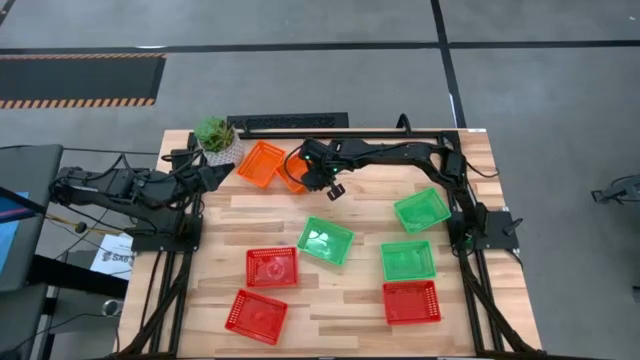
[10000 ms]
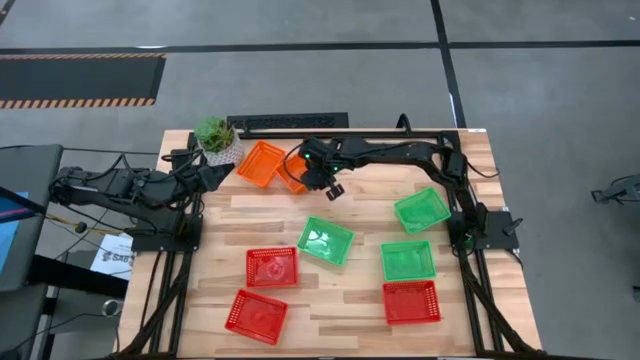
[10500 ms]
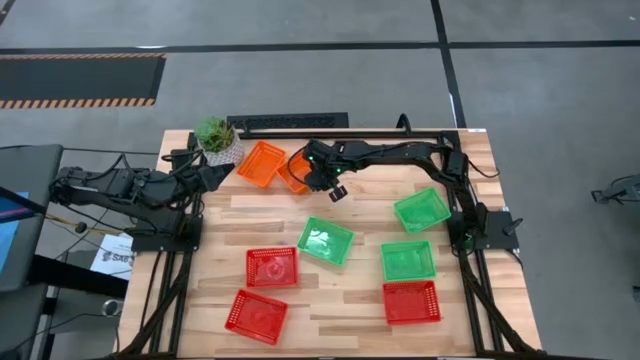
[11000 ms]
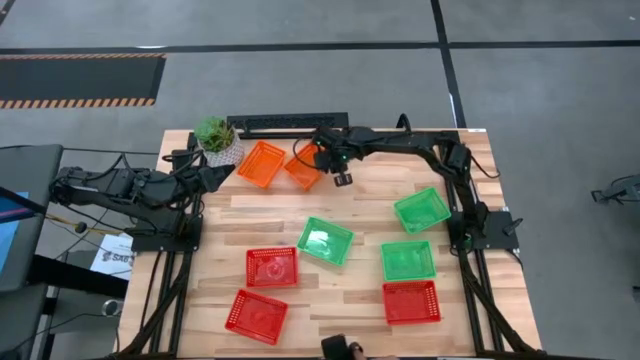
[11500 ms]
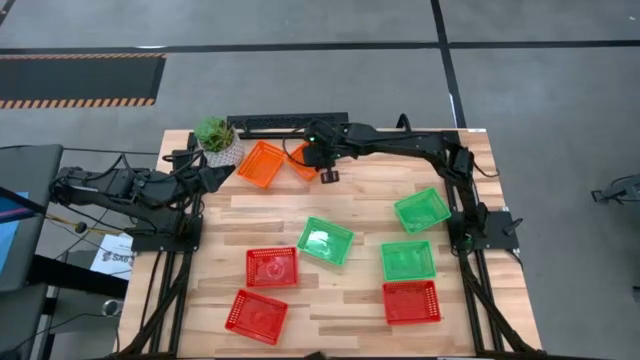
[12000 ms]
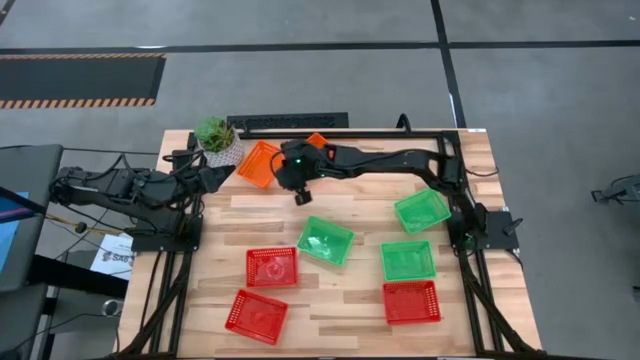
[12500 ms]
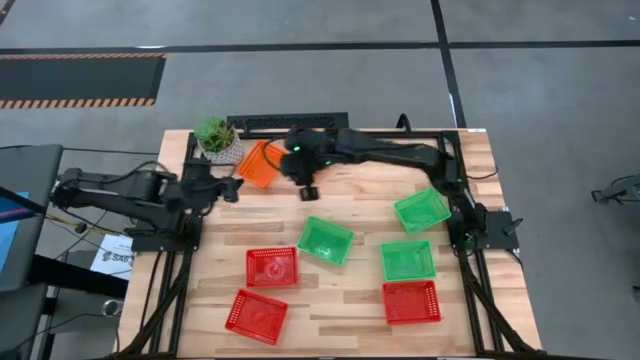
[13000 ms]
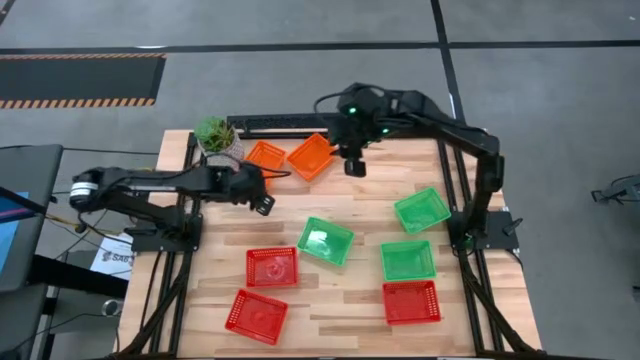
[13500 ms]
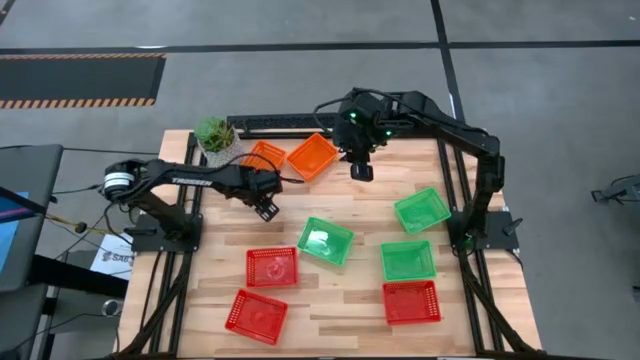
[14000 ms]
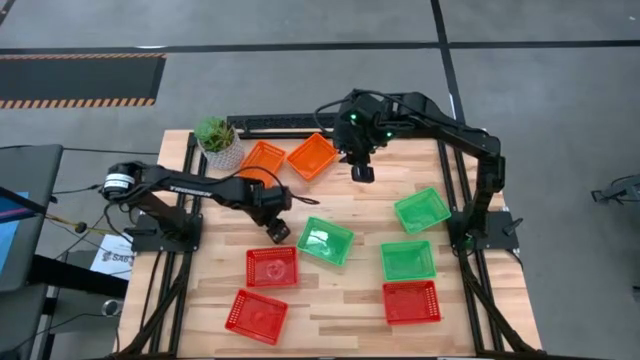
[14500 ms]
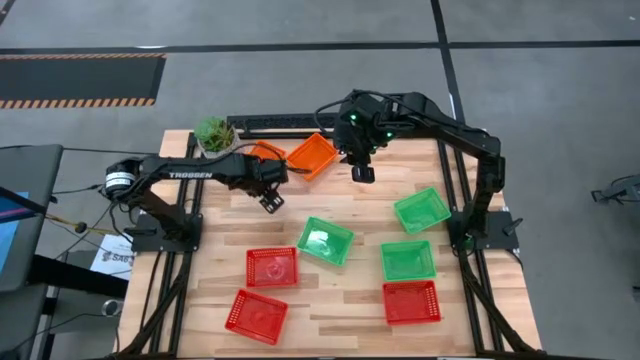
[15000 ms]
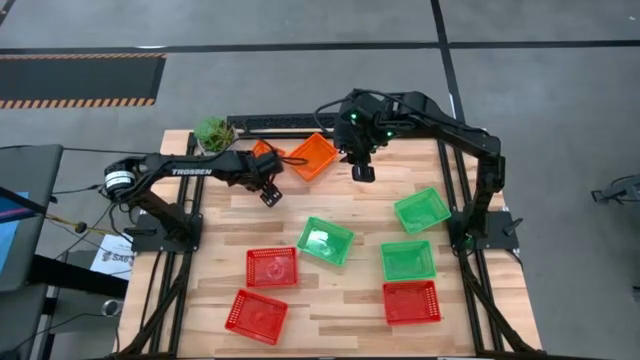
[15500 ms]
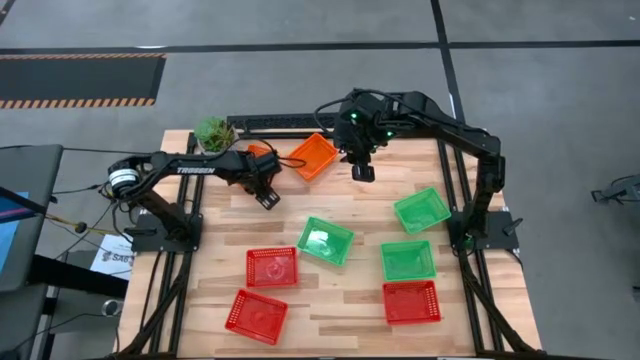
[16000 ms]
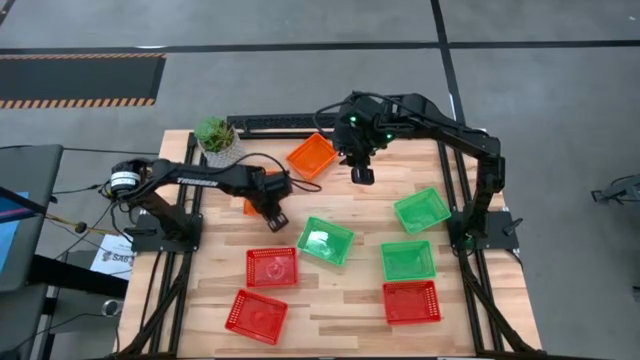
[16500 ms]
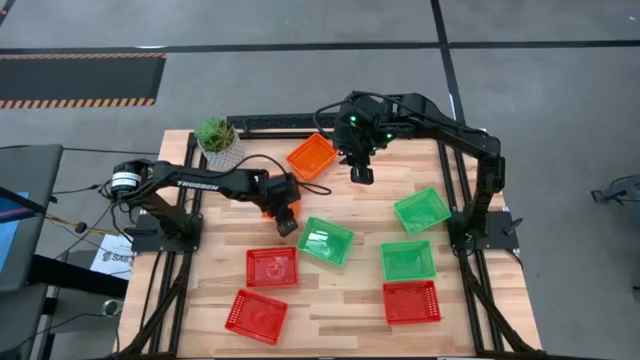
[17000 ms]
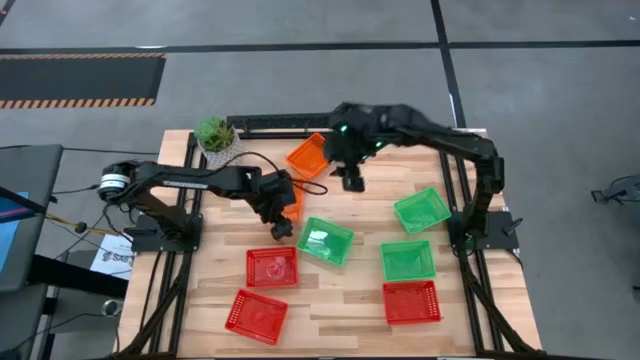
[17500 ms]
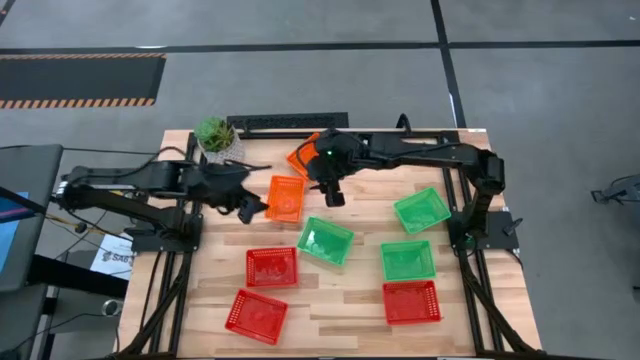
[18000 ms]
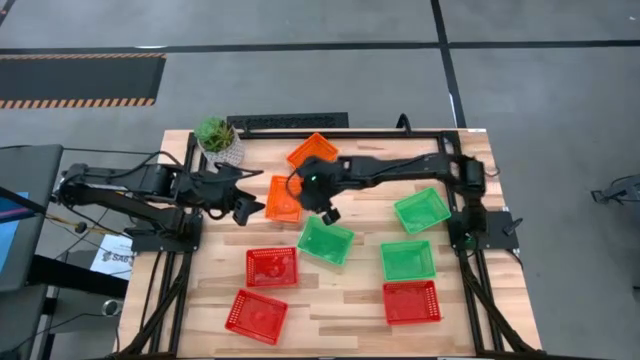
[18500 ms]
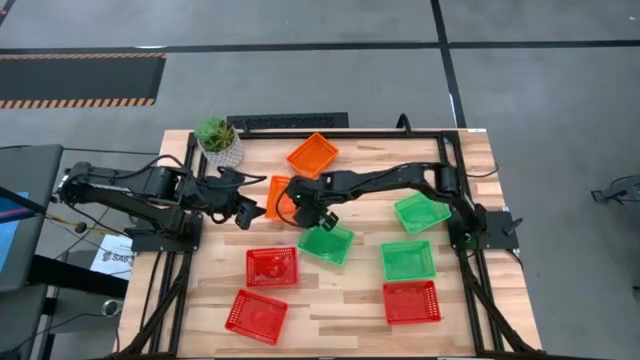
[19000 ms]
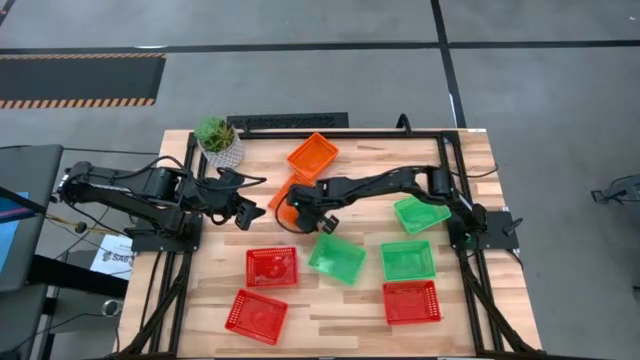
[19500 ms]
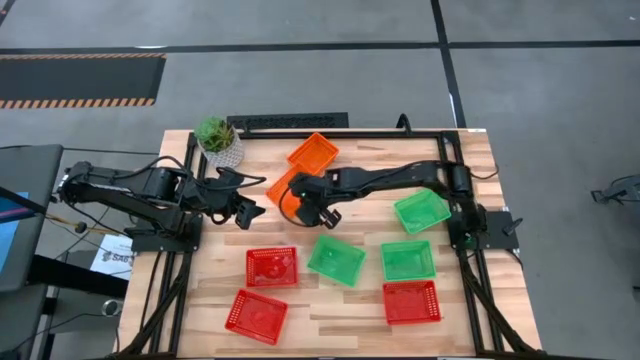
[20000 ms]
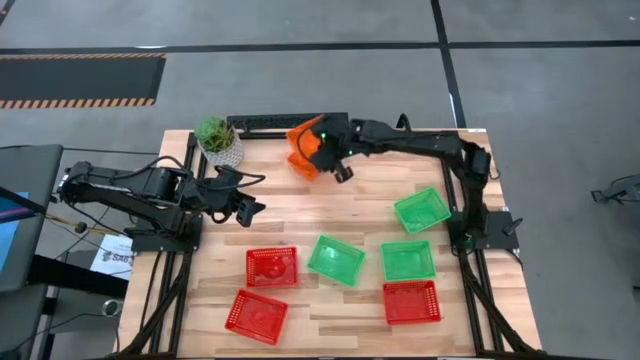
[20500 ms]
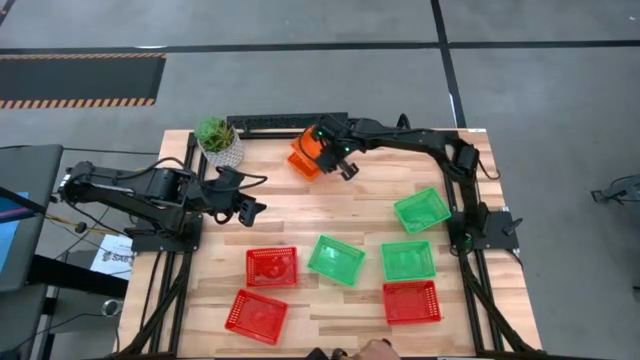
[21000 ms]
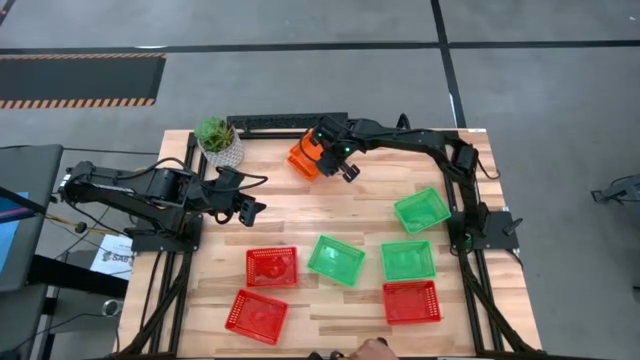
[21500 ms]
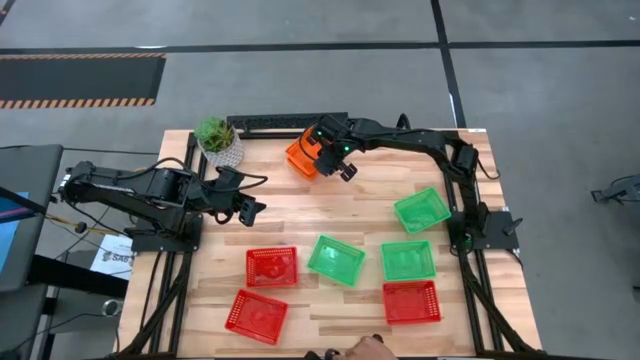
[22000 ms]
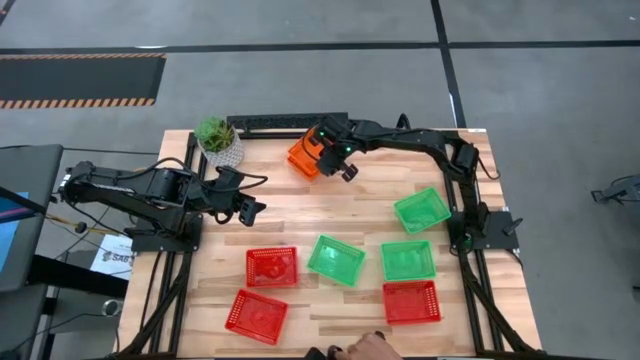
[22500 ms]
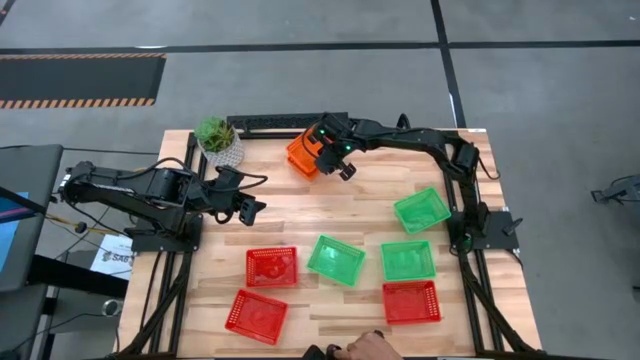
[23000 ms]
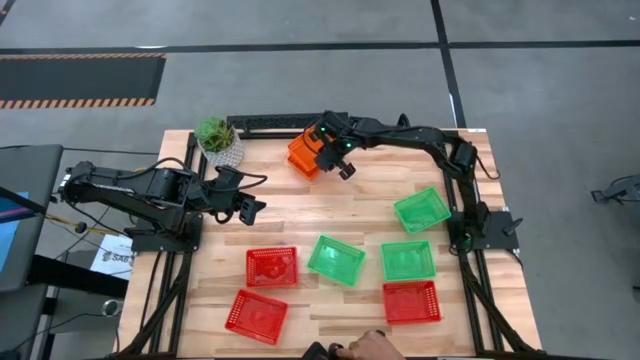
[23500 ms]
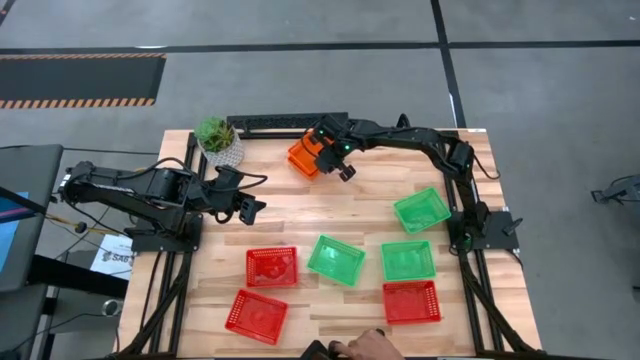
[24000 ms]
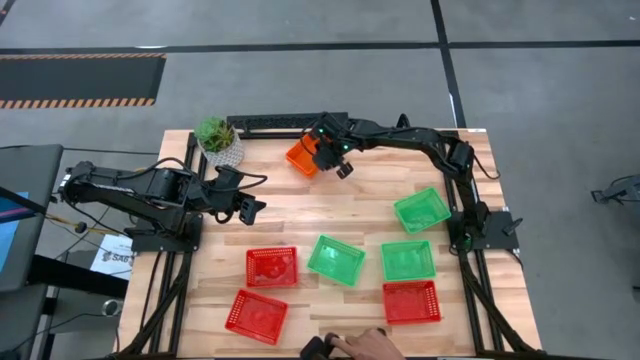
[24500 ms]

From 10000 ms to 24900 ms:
Stack the bottom orange bin on the top orange bin

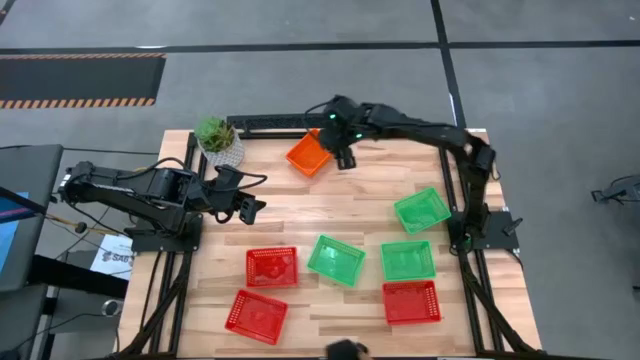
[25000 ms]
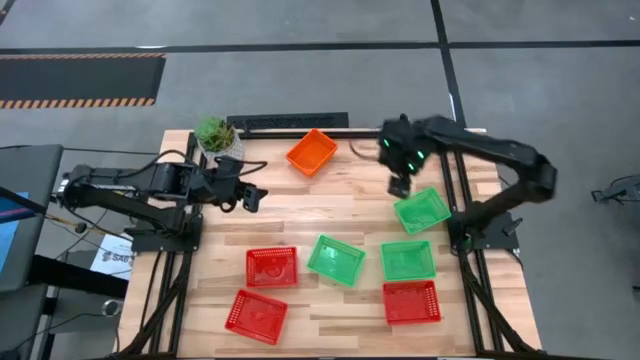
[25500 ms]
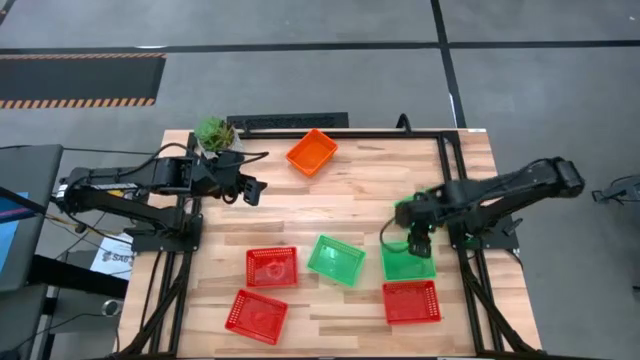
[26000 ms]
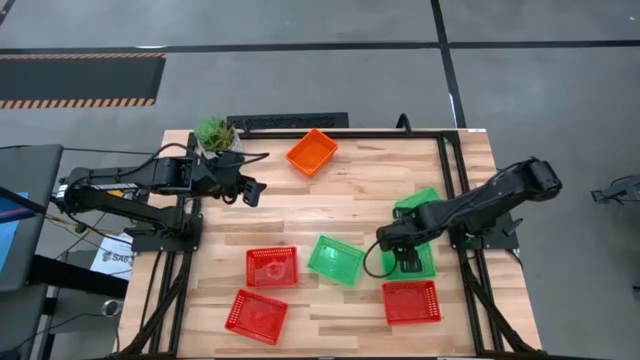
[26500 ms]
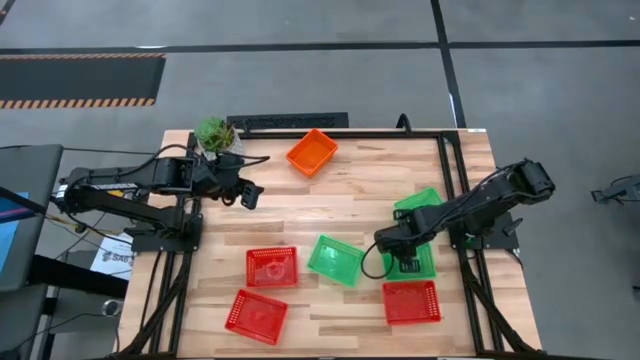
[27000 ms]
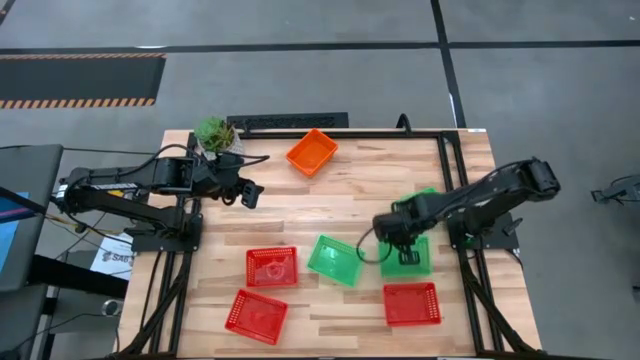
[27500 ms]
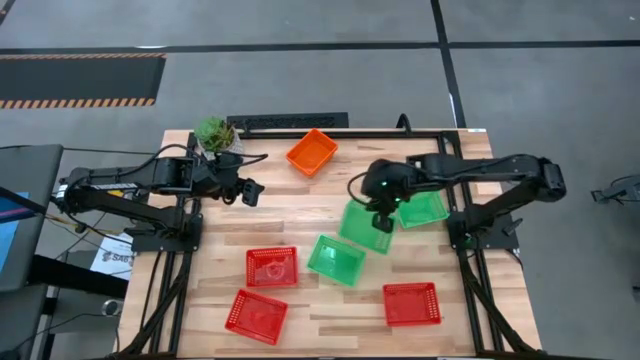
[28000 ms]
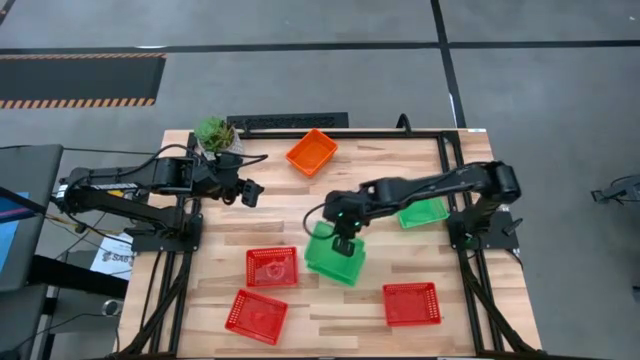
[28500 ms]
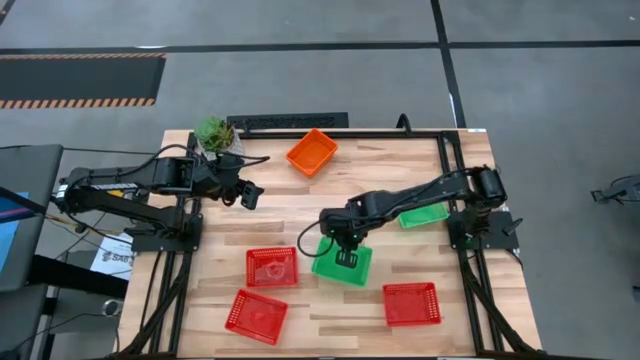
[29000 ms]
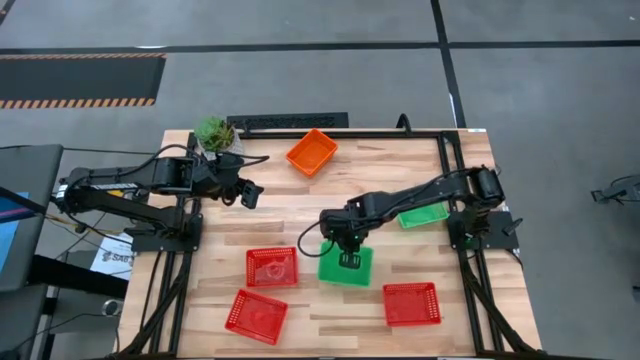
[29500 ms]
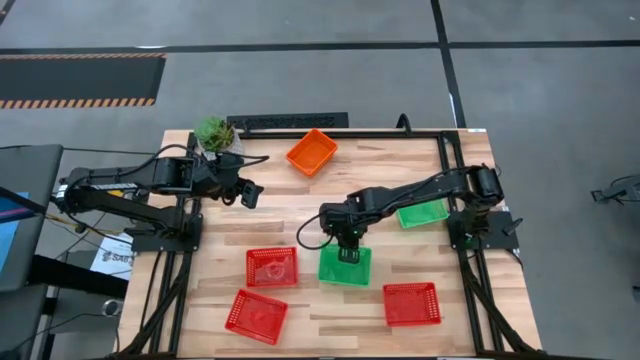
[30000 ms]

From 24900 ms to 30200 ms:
Stack the bottom right green bin on the bottom left green bin

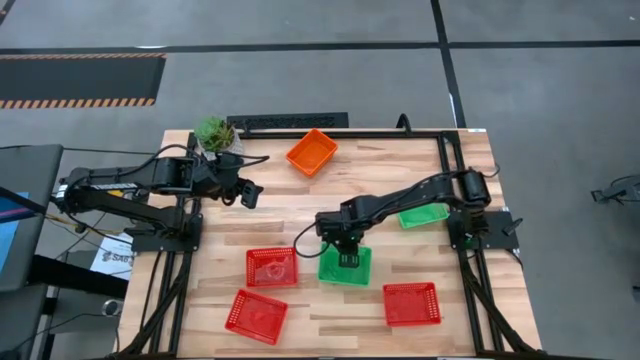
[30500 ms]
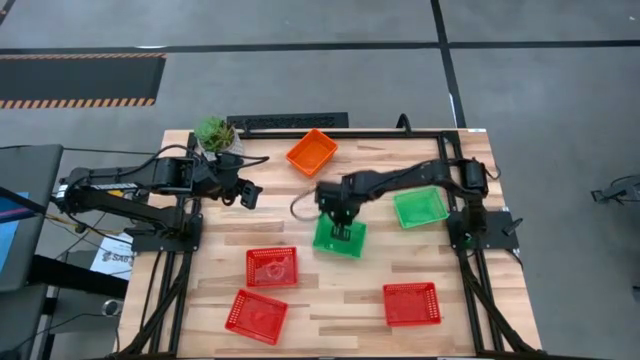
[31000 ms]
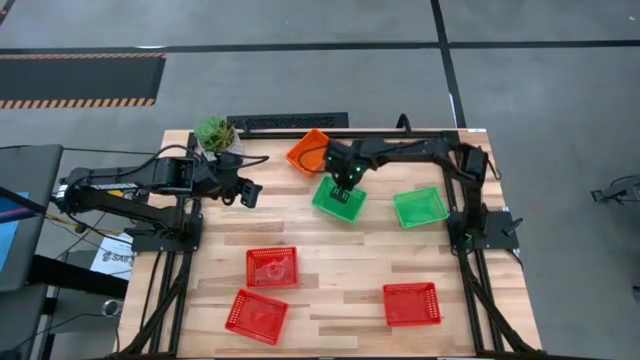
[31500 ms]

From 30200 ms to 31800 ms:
Move the stacked green bins to the top of the table
